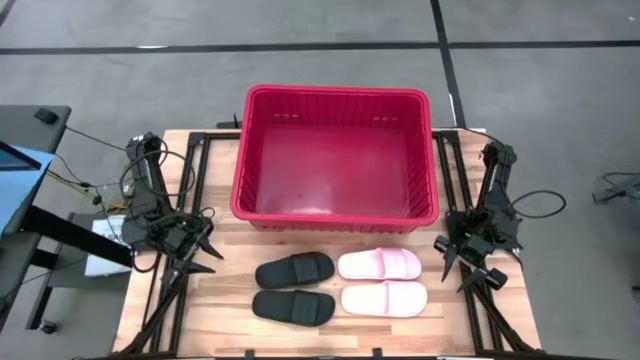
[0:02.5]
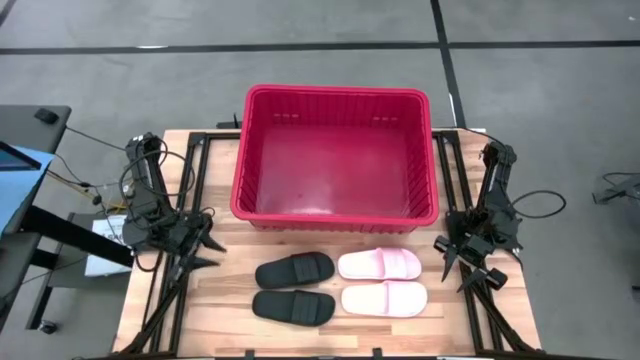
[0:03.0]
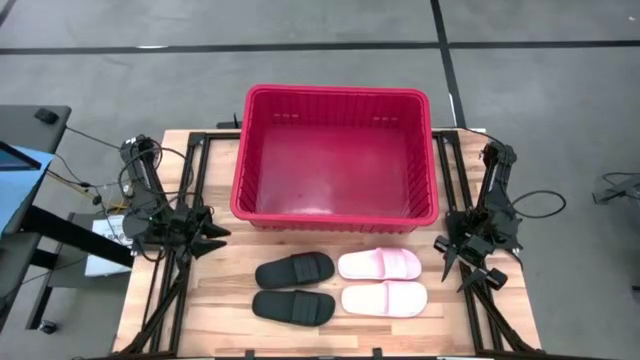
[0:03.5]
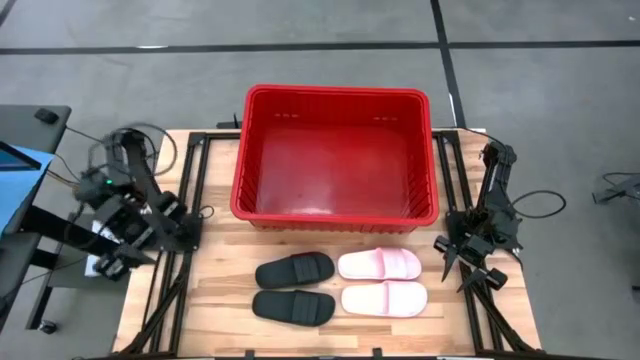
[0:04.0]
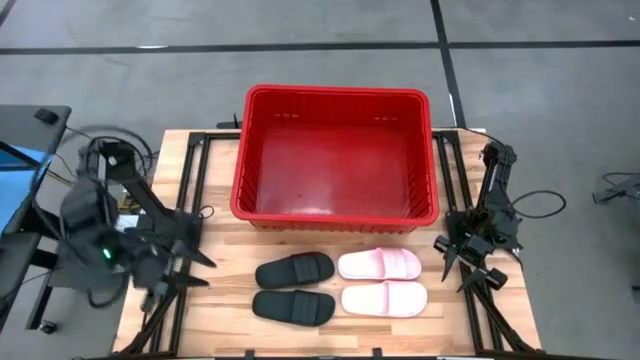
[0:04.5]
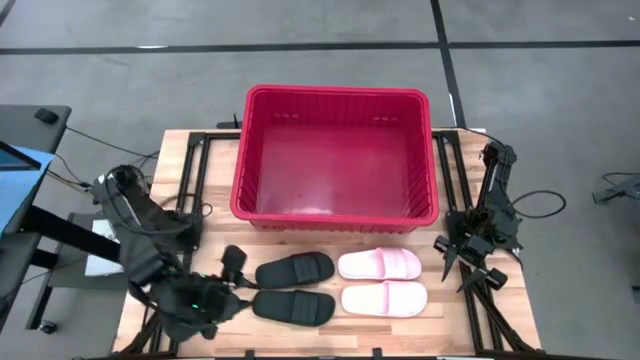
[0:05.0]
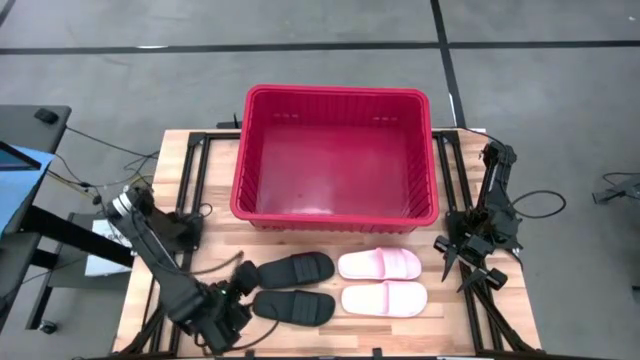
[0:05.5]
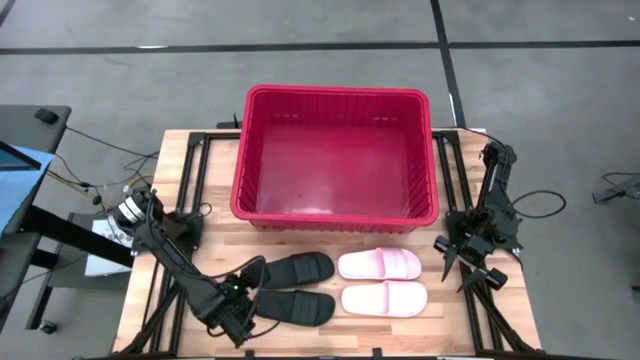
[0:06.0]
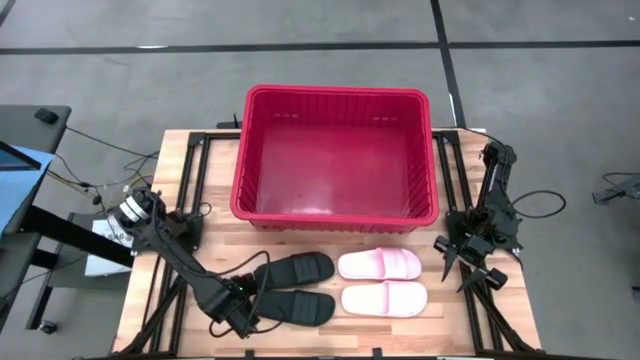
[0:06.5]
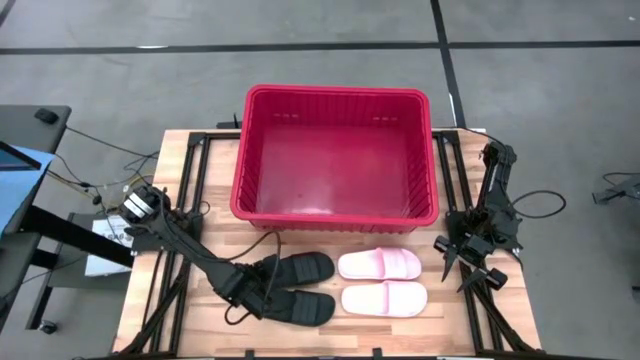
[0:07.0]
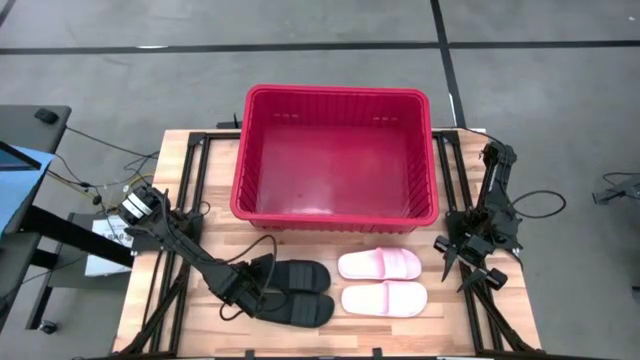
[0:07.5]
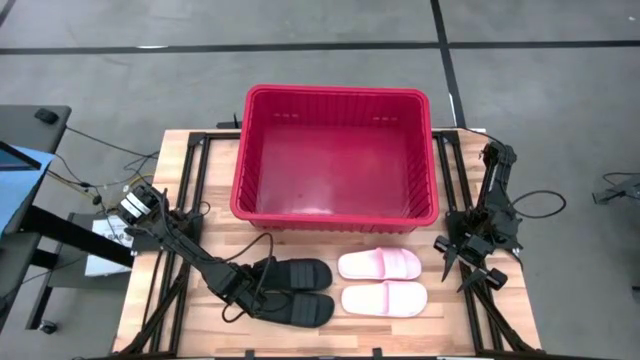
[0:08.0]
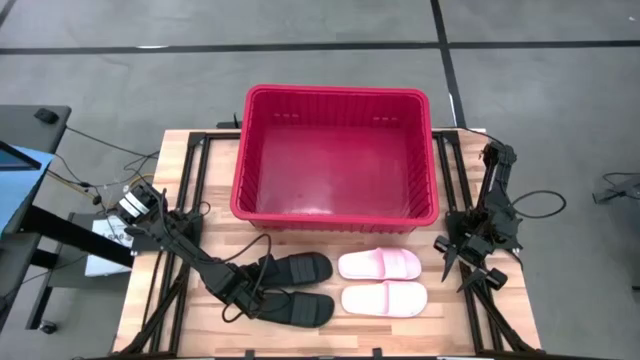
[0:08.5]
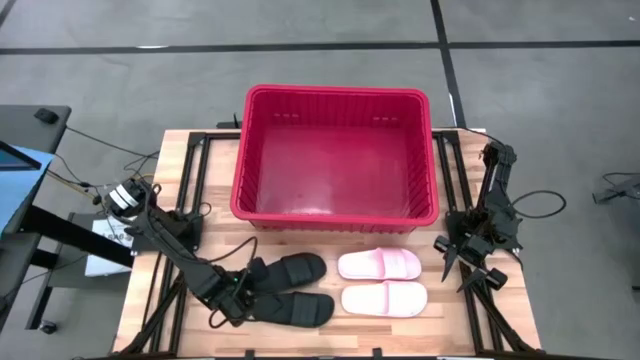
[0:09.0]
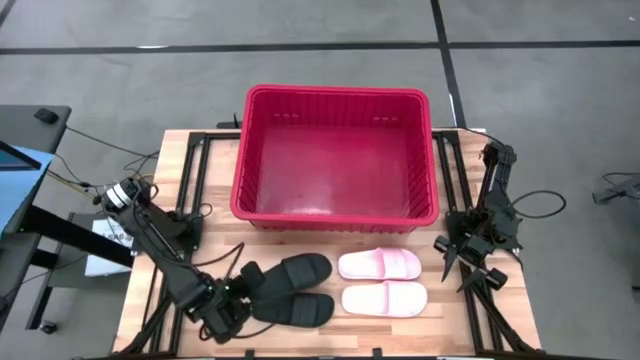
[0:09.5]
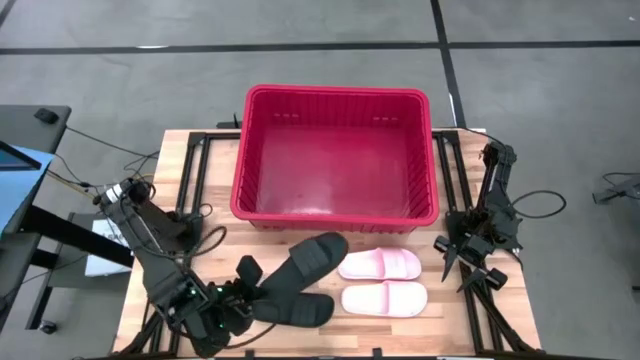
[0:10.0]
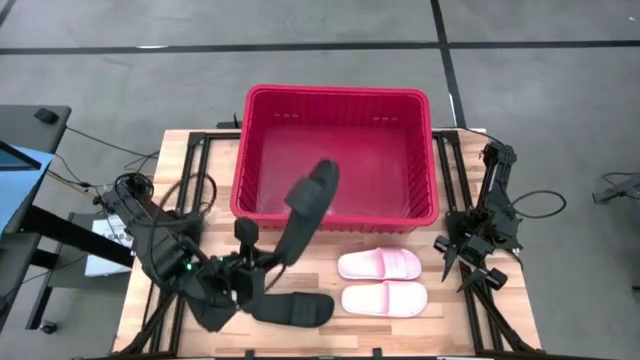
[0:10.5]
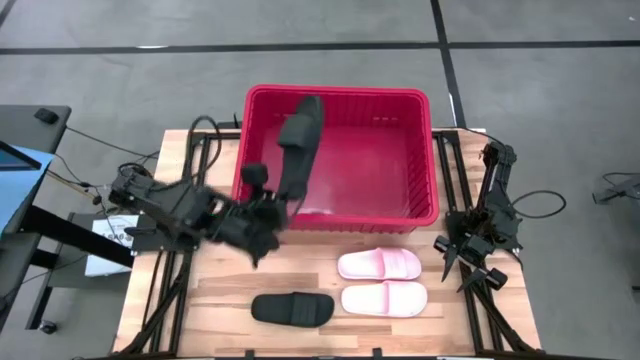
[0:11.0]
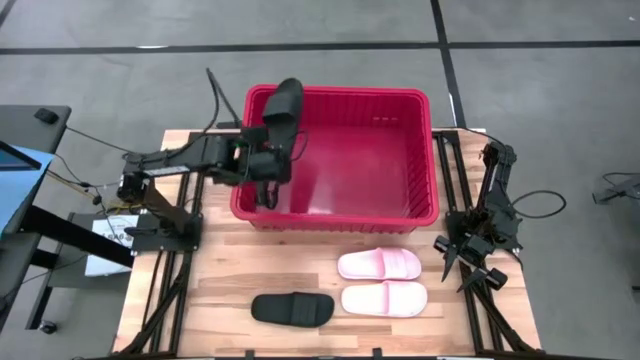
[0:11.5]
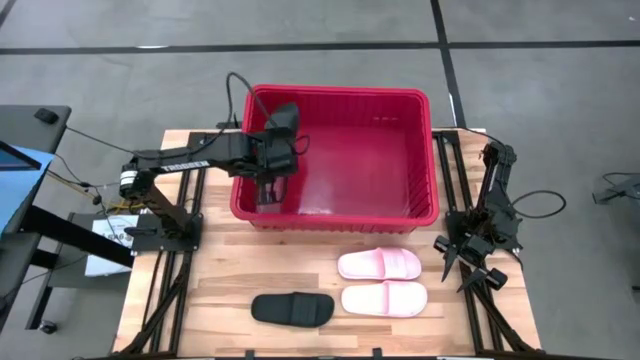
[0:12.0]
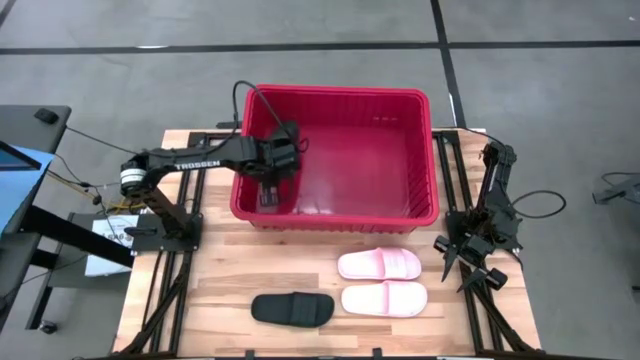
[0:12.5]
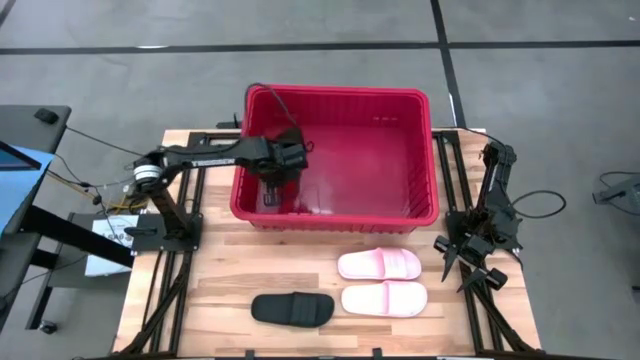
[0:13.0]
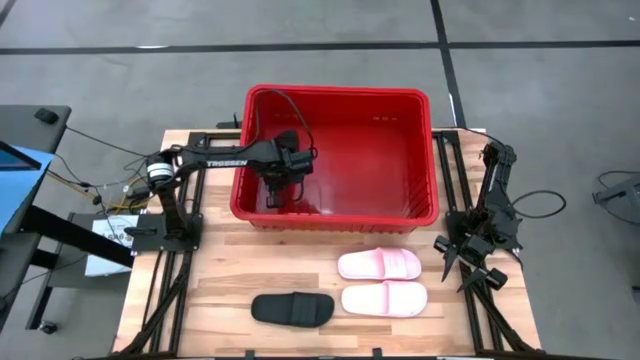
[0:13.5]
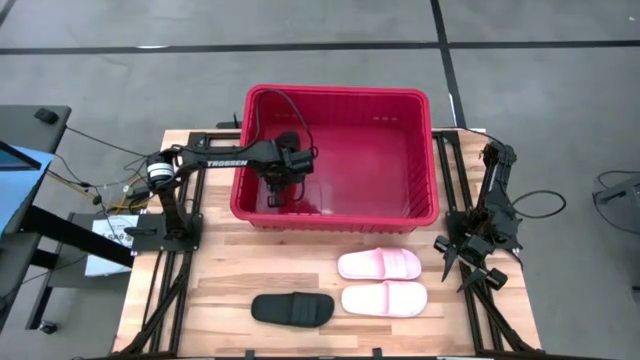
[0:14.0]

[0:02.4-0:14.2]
Task: Pick and place slides into bin
Put the black slipper into the red bin

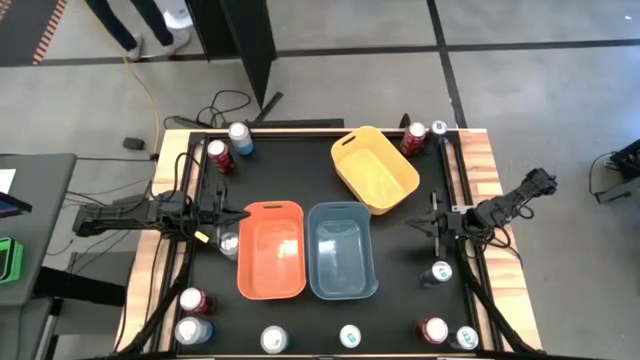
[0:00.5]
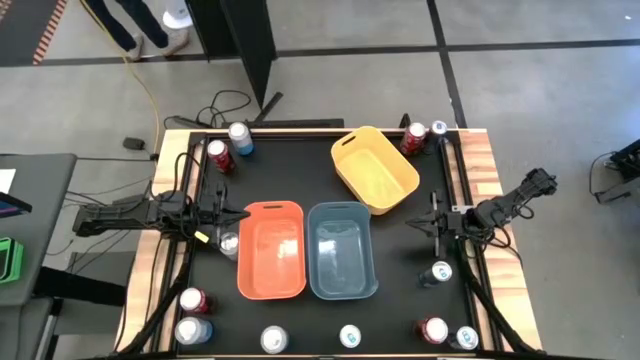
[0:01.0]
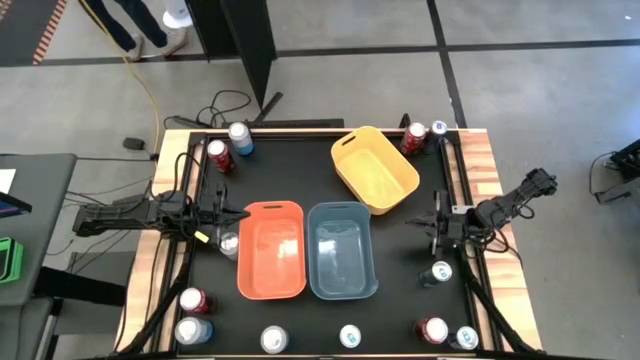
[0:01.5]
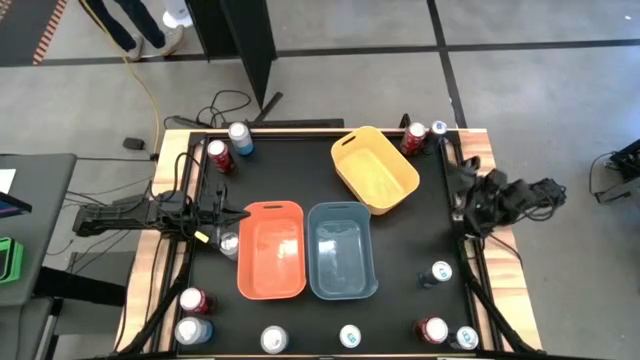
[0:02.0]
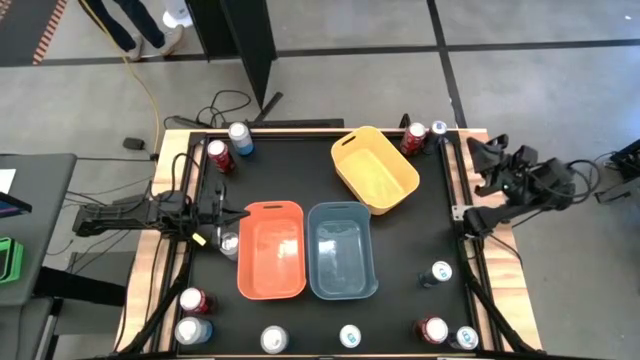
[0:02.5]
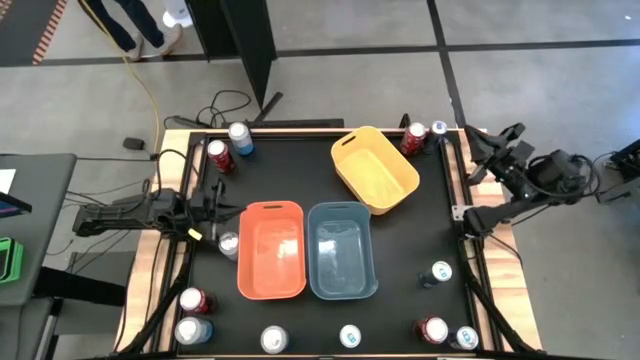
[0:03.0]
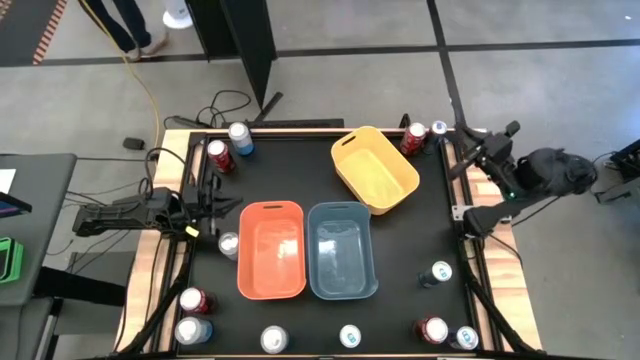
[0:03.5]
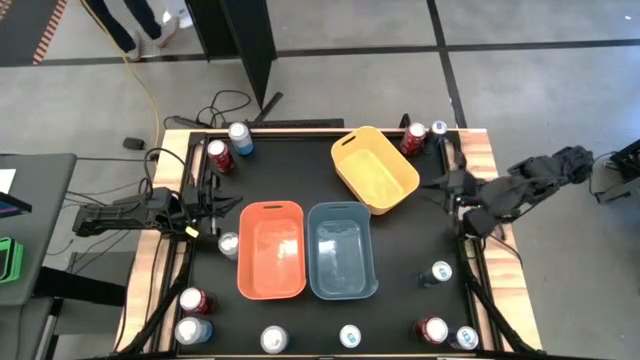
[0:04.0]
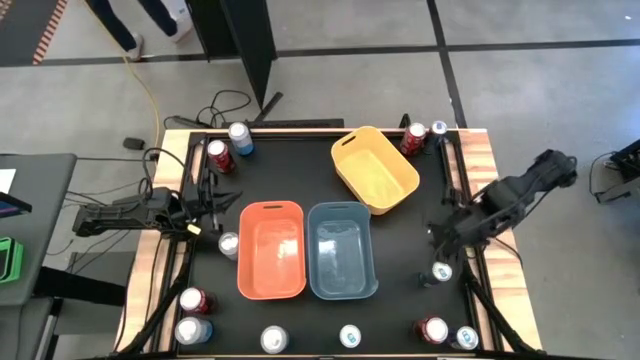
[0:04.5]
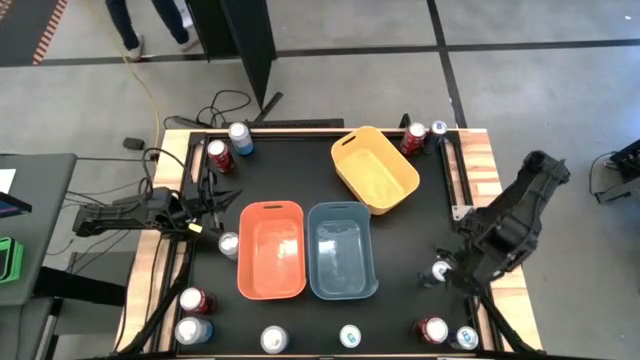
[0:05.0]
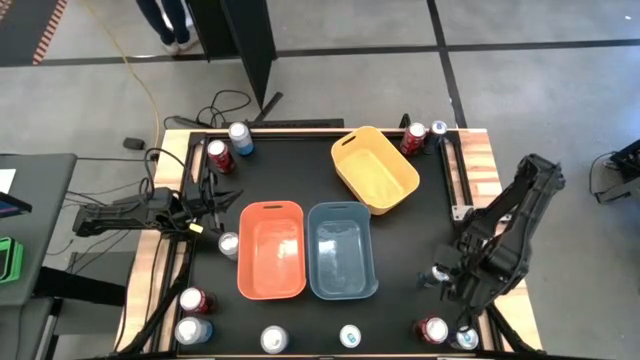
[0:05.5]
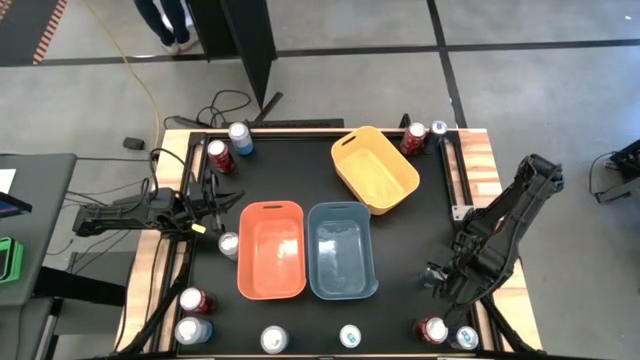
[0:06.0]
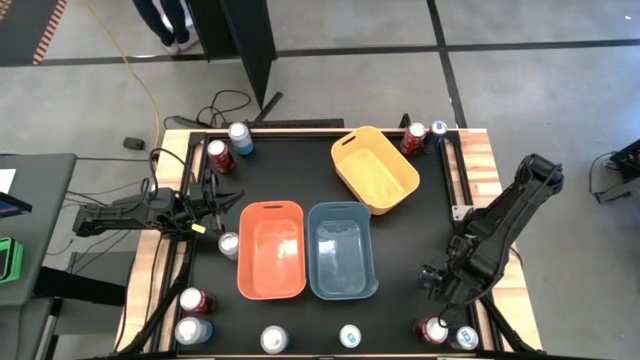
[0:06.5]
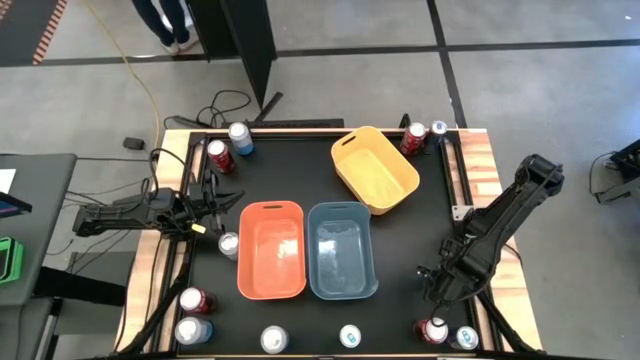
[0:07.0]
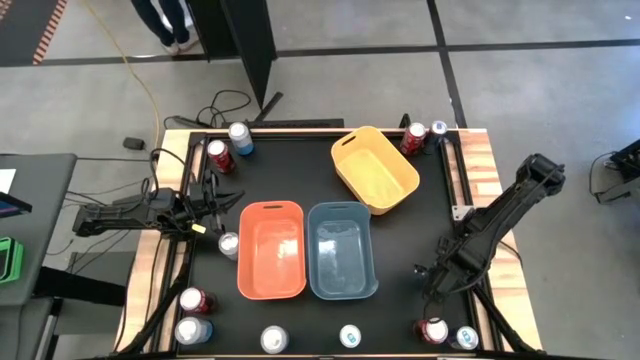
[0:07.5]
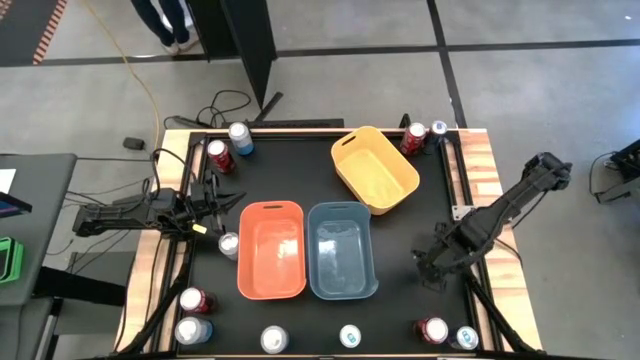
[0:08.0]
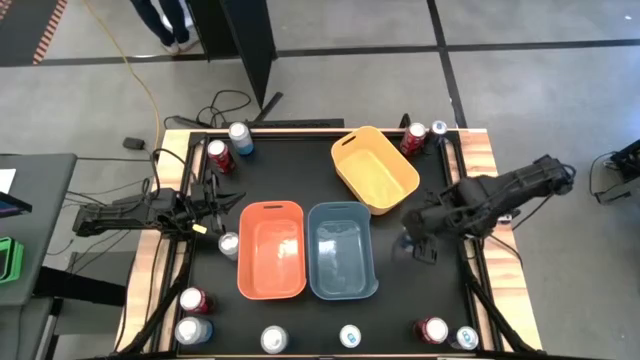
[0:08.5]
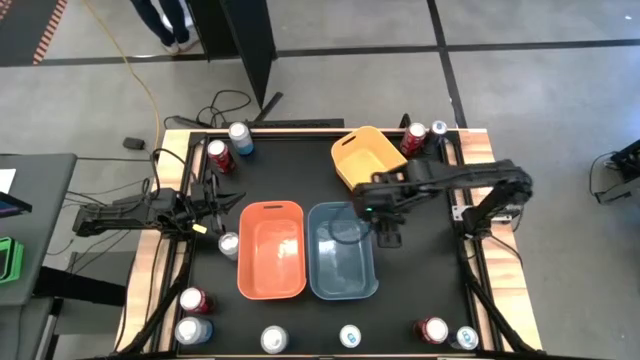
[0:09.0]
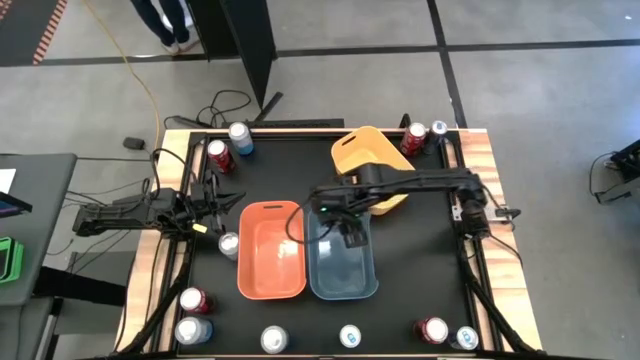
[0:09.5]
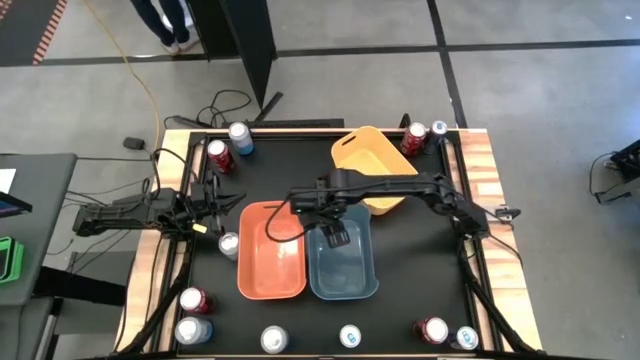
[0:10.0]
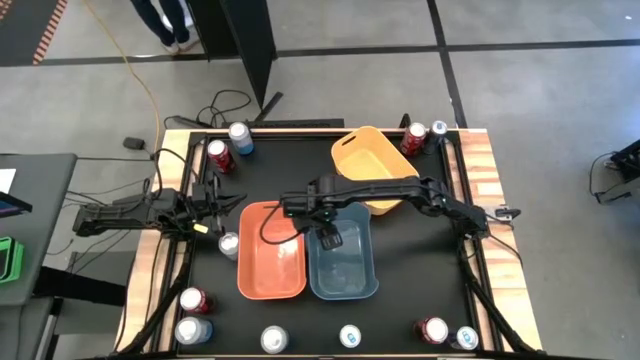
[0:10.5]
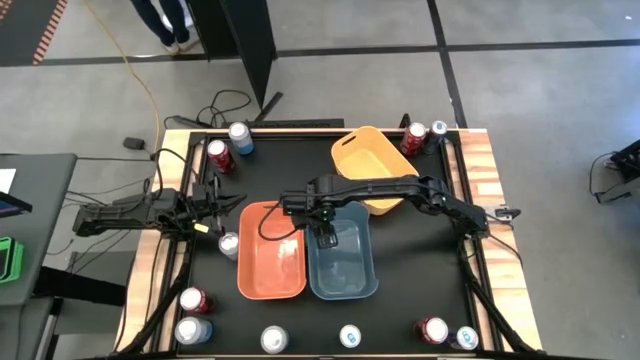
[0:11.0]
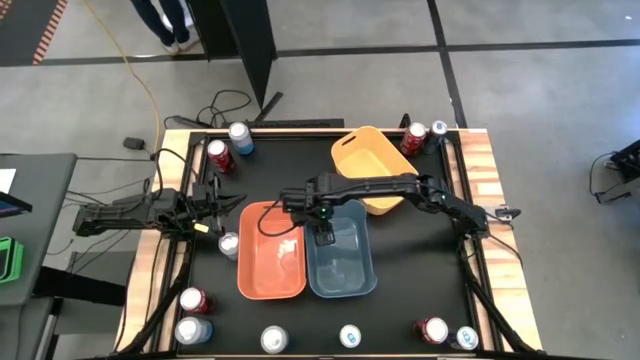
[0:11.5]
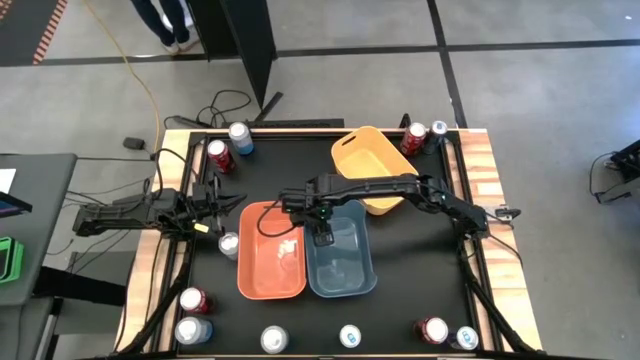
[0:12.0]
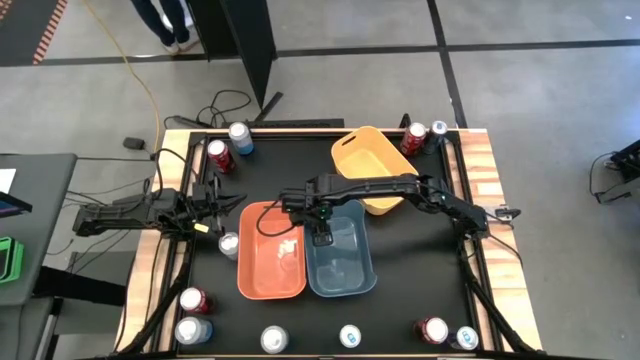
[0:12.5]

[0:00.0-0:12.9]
Task: Sort soda cans
Put the middle right blue soda can into the blue bin
